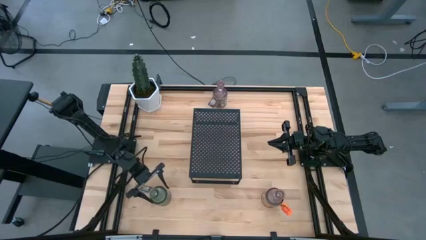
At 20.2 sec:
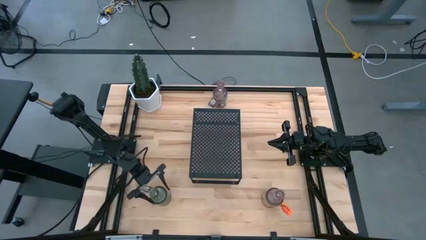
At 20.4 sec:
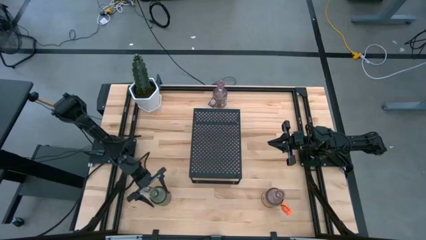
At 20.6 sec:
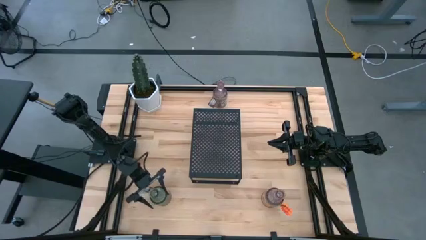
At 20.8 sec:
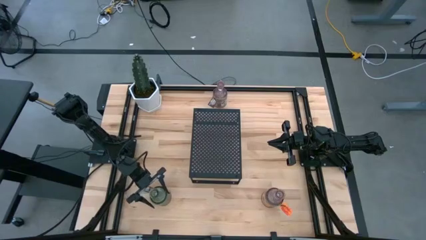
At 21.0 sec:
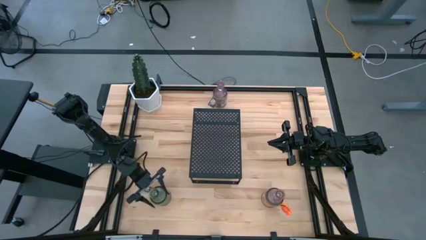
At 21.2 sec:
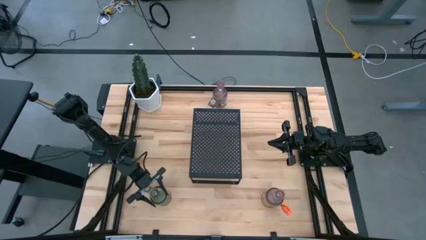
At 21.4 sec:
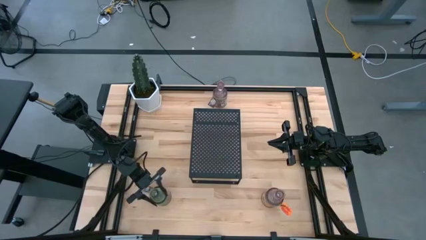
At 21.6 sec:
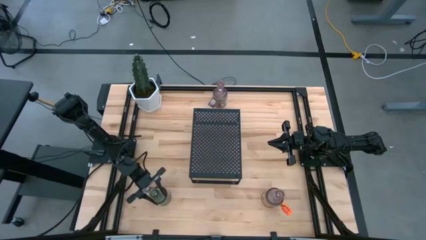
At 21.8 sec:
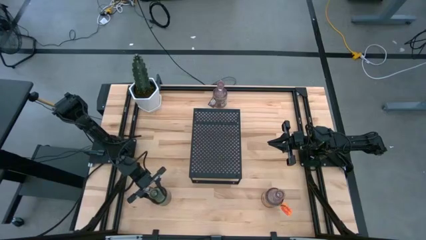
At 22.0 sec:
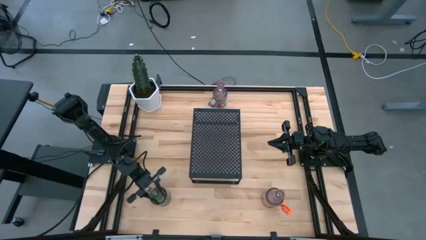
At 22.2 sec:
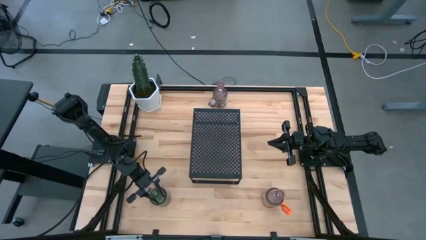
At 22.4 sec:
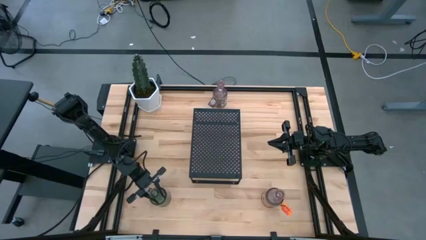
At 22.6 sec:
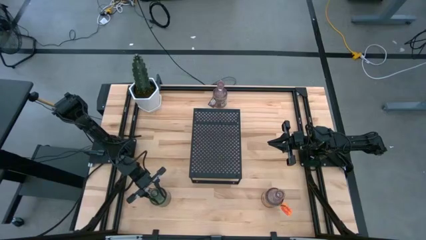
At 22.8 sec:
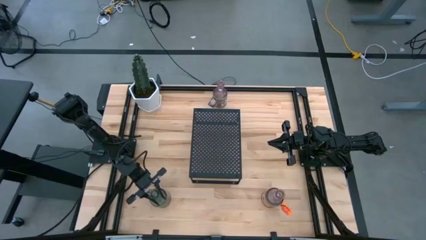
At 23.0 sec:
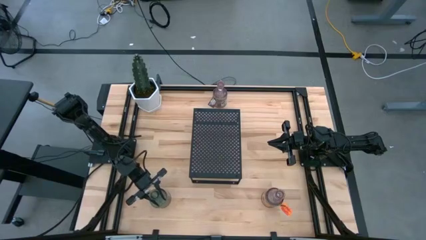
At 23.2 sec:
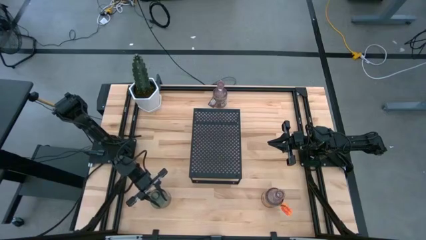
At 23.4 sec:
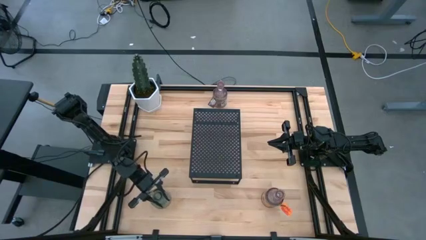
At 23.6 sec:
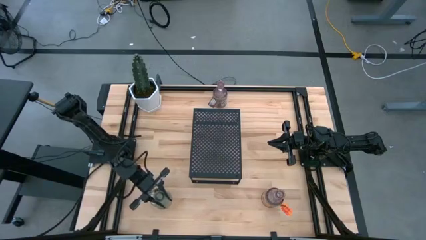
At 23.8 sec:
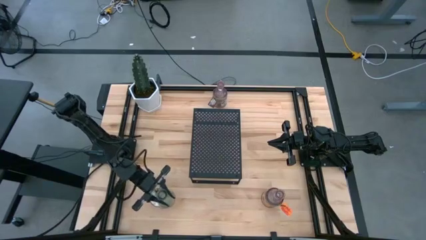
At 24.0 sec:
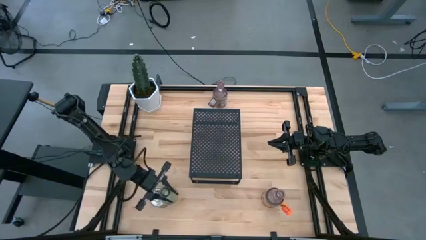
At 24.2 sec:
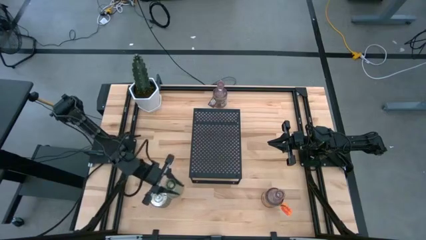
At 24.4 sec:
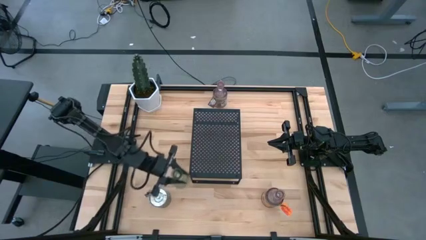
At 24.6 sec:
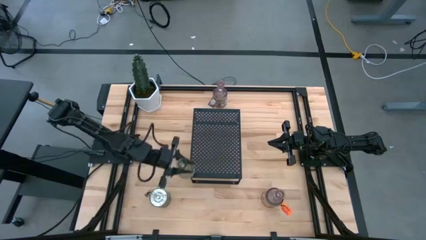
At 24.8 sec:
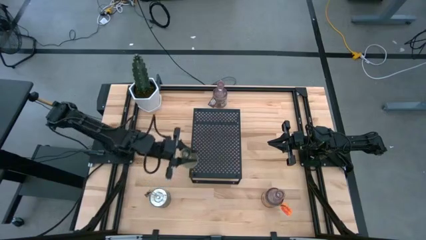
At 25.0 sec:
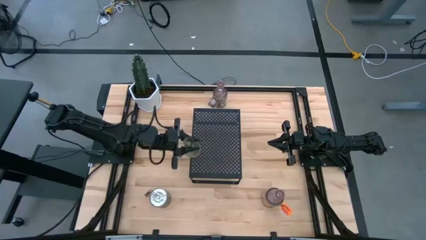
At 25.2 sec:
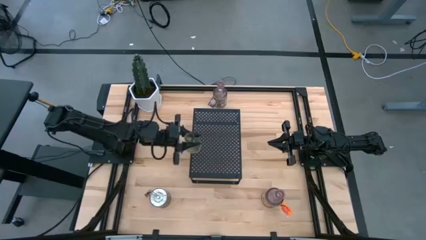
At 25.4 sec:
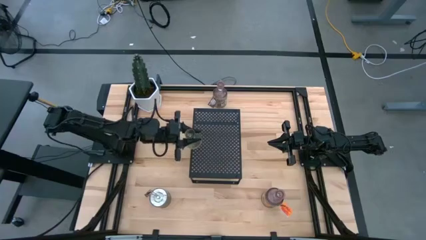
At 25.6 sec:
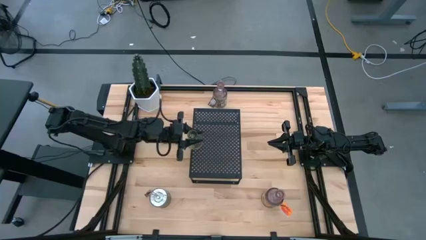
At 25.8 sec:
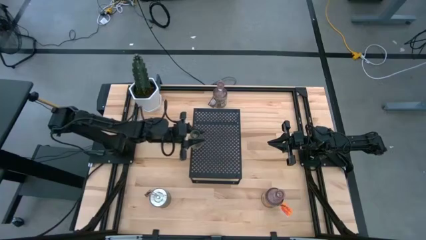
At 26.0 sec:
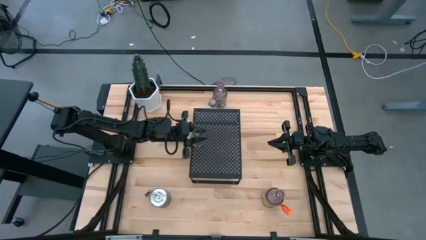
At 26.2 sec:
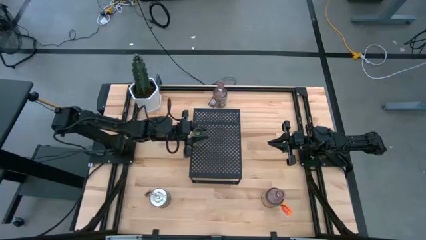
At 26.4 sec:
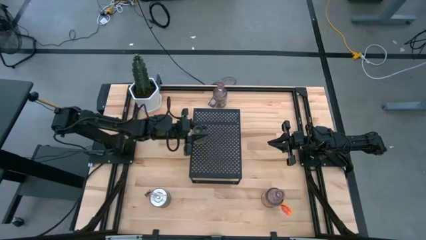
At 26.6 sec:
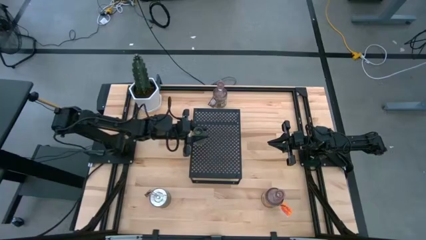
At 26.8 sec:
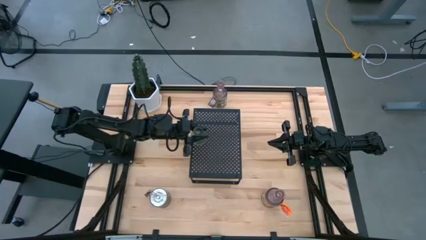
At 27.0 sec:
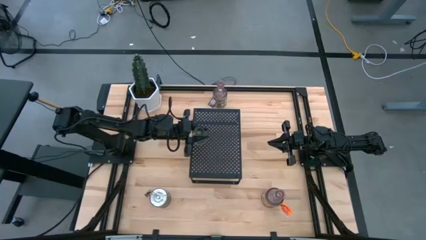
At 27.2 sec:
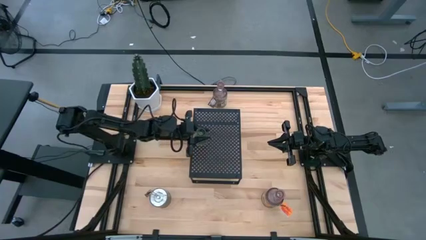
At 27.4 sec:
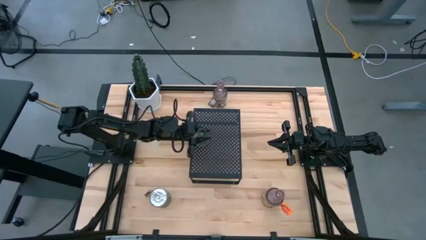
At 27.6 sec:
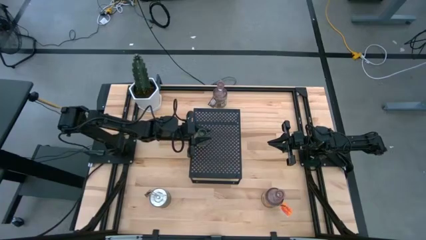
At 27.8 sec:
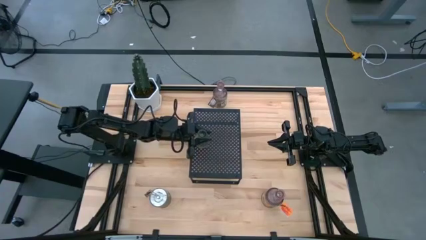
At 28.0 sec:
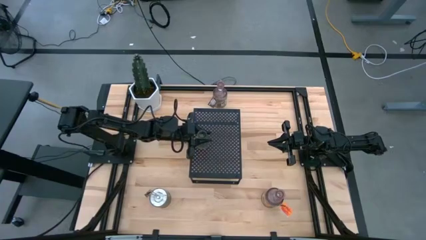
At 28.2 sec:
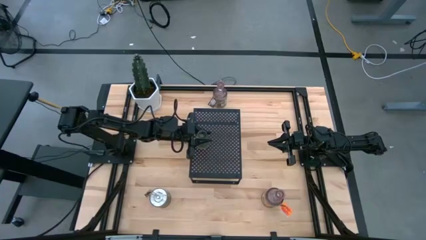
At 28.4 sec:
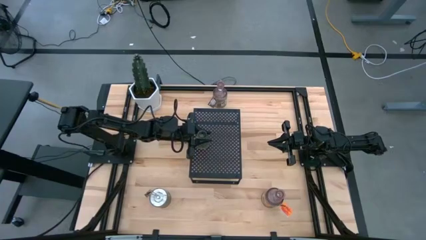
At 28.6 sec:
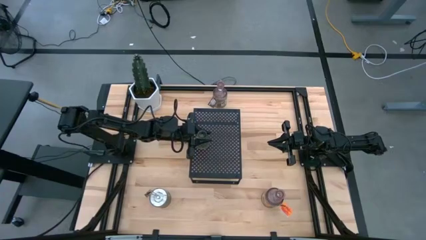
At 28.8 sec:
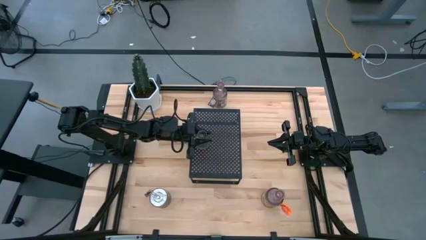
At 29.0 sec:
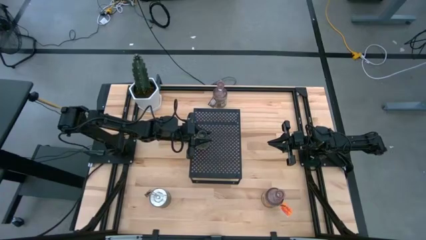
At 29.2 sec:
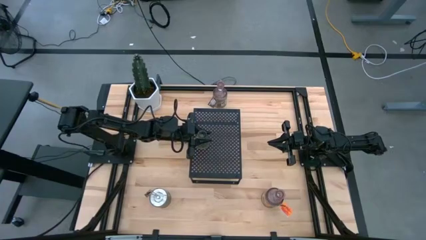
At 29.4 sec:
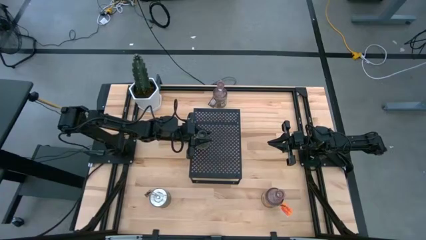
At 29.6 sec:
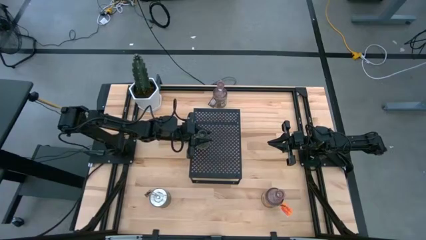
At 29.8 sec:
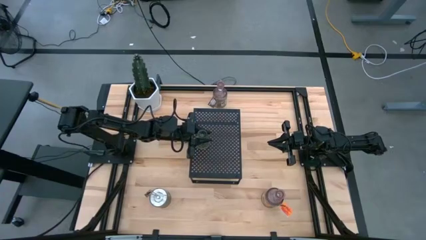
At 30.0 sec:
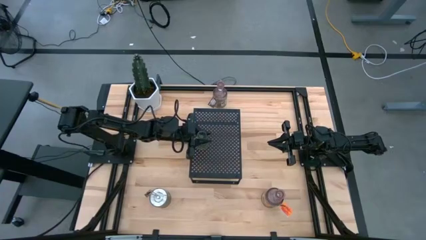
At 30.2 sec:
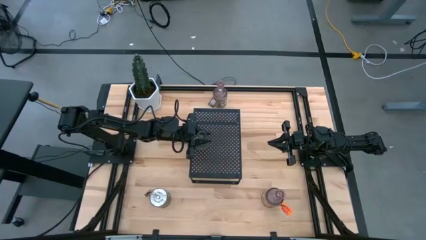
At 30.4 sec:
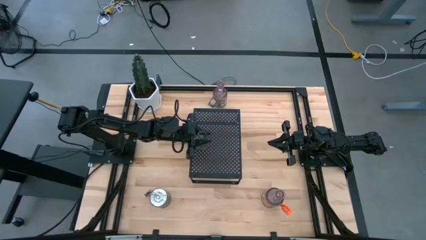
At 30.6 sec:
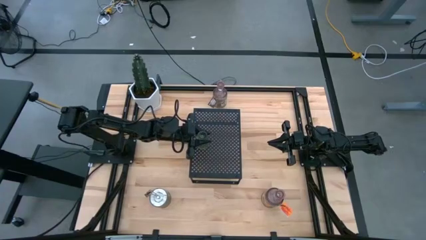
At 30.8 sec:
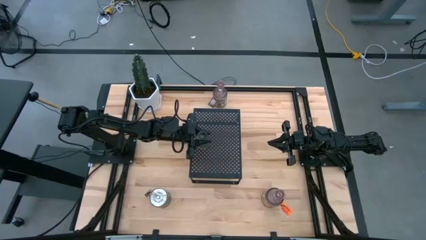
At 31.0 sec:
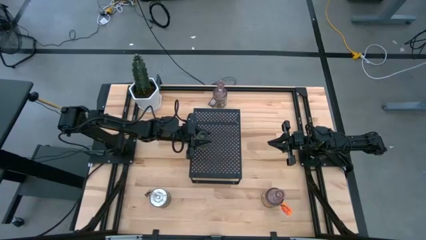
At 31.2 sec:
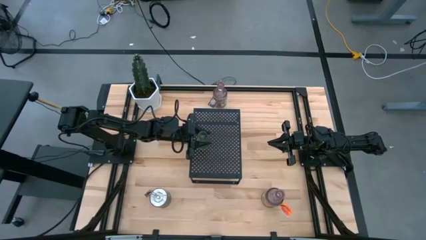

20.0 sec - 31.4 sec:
Task: Pick & Place candle stick holders
Put the green candle vase on the shelf

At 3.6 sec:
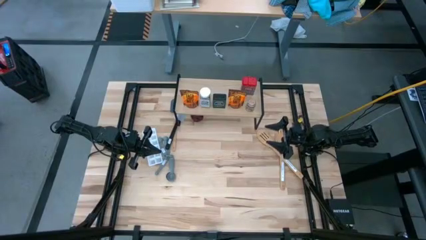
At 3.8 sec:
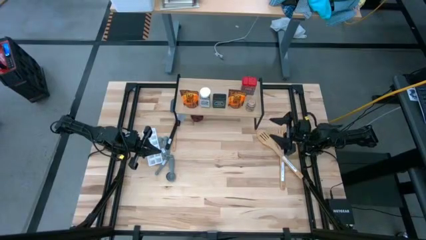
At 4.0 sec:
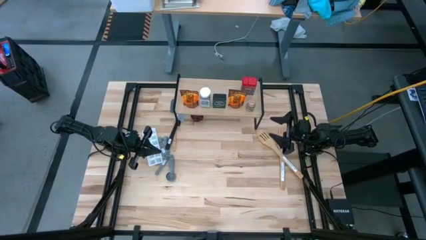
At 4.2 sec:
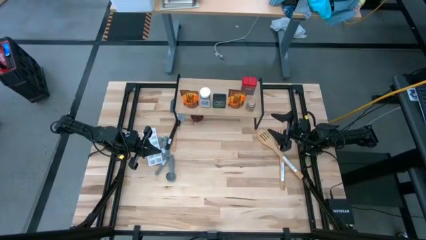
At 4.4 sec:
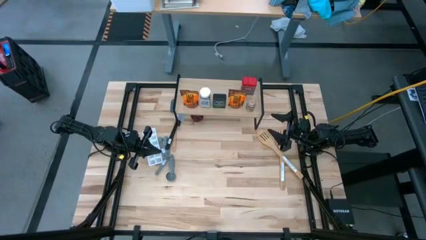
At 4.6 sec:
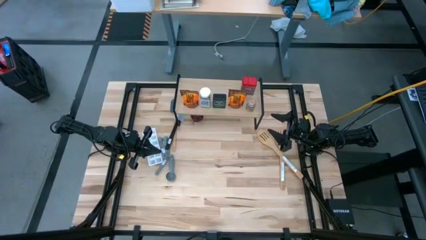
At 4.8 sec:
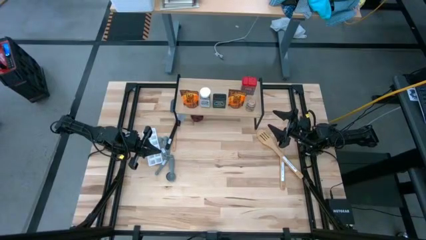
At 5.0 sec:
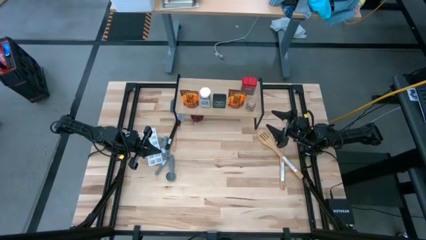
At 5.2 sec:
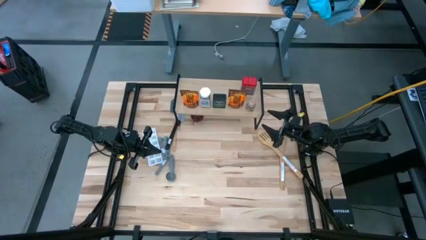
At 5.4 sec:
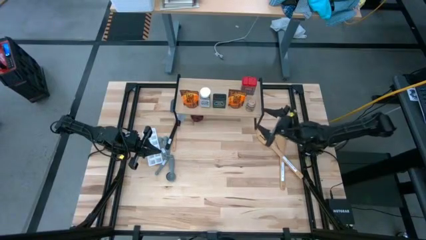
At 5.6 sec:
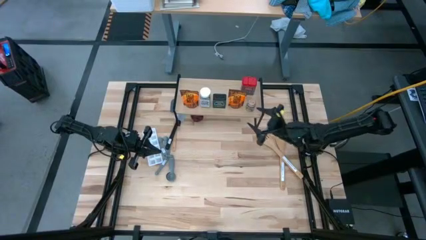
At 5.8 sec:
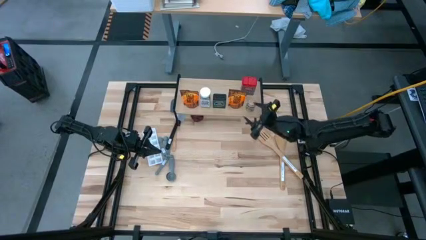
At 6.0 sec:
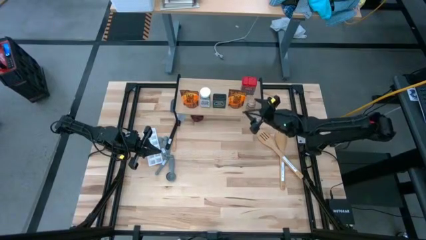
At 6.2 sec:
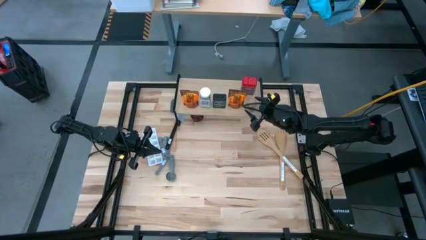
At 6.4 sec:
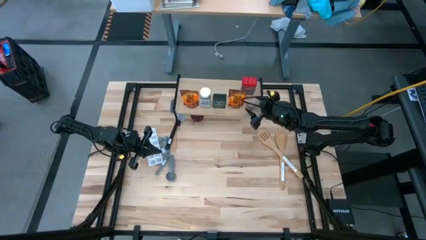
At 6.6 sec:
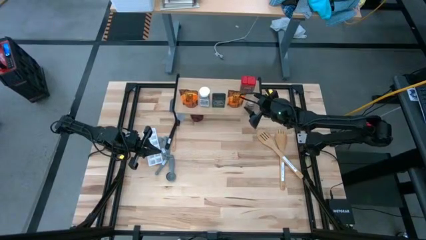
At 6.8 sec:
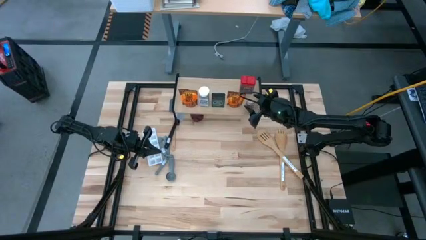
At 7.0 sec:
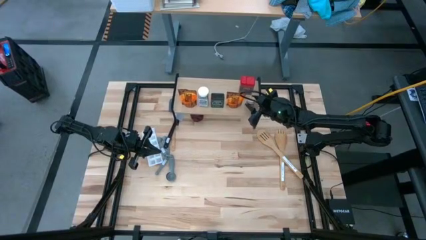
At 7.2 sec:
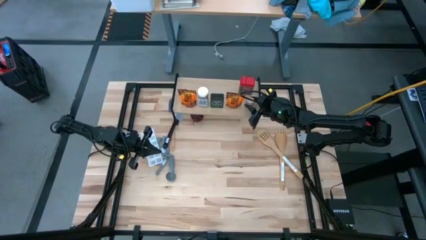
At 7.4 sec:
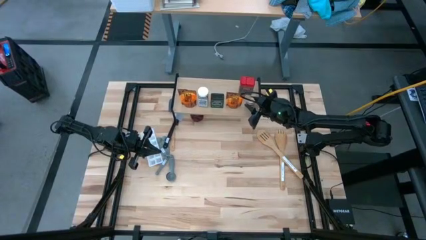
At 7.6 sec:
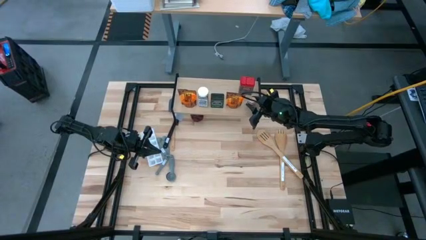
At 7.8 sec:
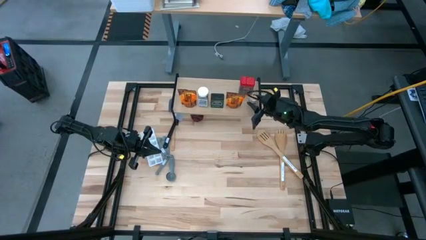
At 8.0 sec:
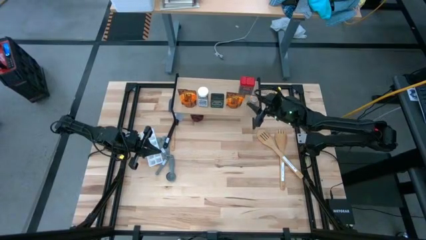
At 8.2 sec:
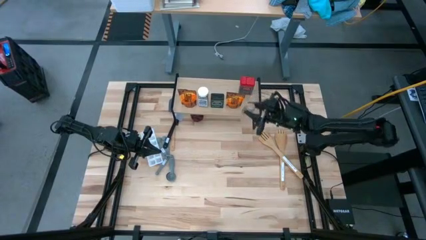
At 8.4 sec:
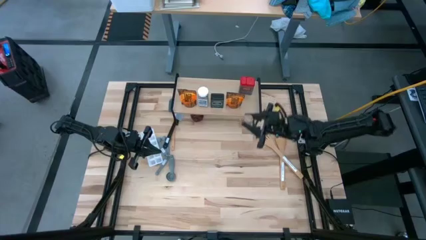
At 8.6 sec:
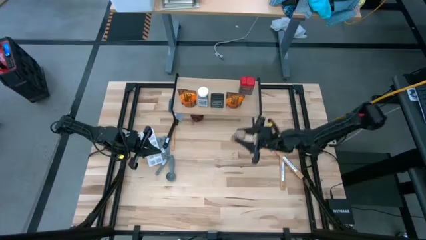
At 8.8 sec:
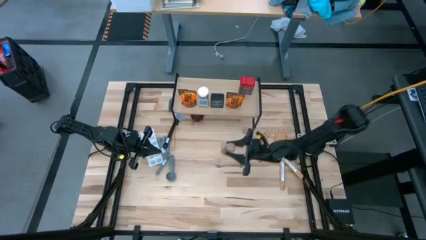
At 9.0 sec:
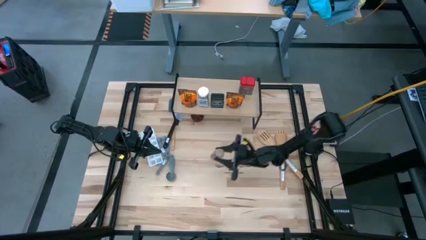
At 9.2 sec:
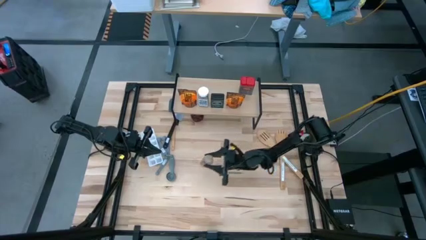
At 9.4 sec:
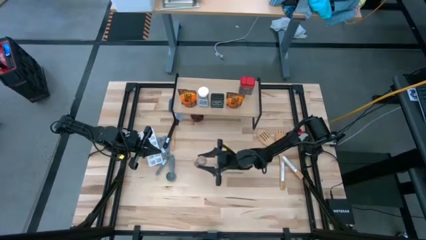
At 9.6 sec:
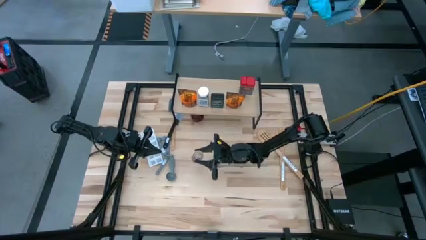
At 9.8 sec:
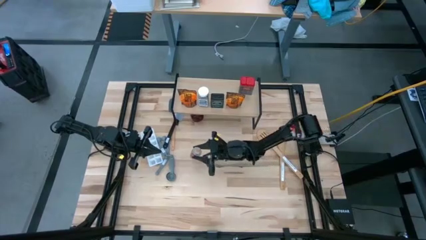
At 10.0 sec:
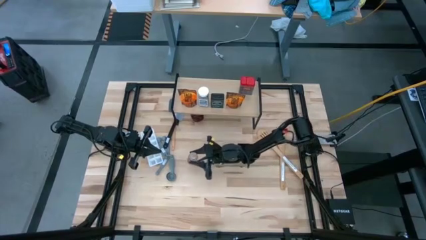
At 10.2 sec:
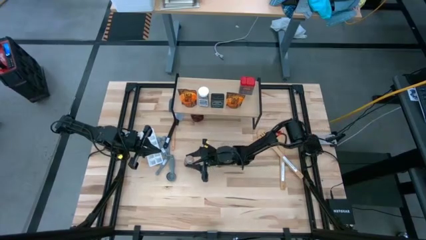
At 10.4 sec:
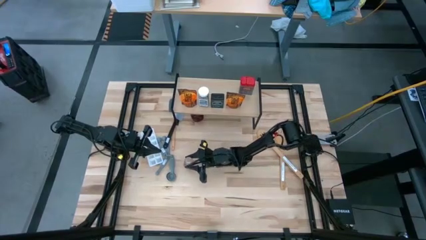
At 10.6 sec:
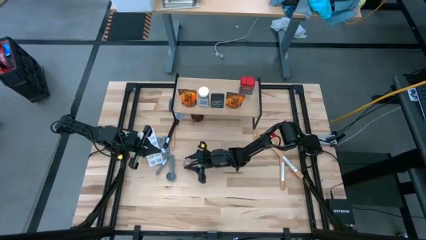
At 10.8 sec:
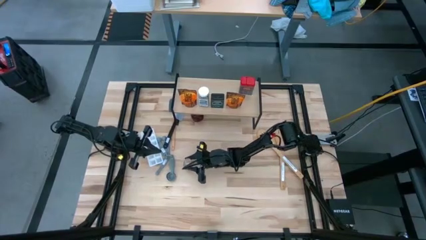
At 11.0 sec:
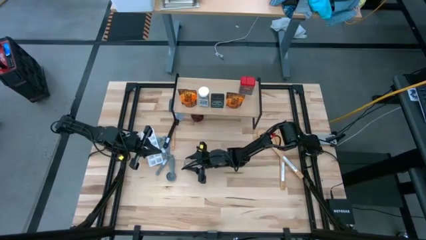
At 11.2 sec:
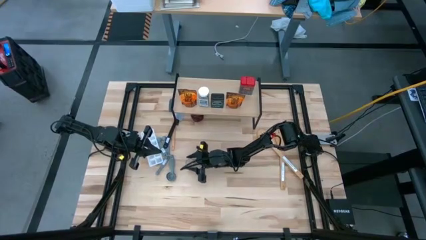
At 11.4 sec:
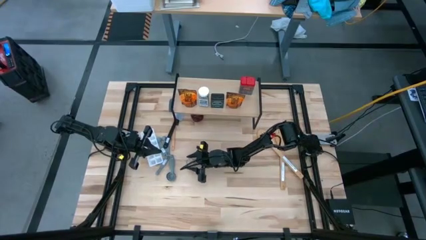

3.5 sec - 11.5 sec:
Task: Shelf spices
Remove the transparent seasoning bottle from the shelf
